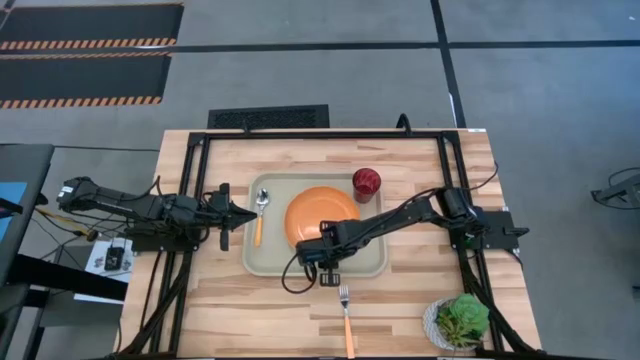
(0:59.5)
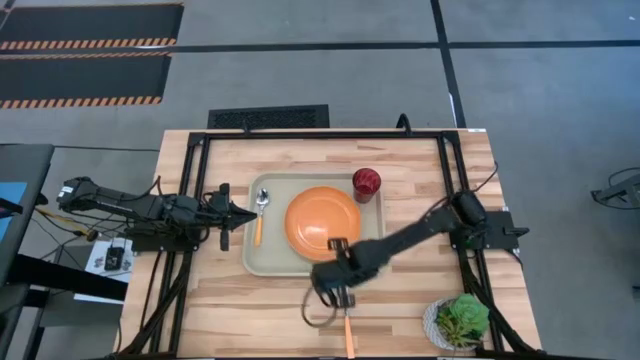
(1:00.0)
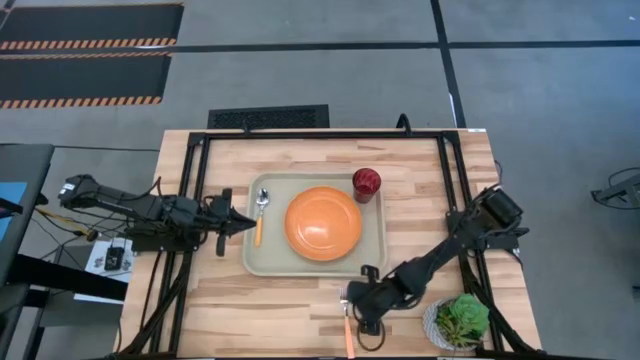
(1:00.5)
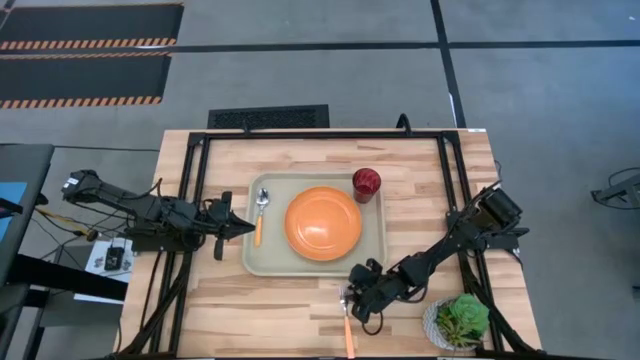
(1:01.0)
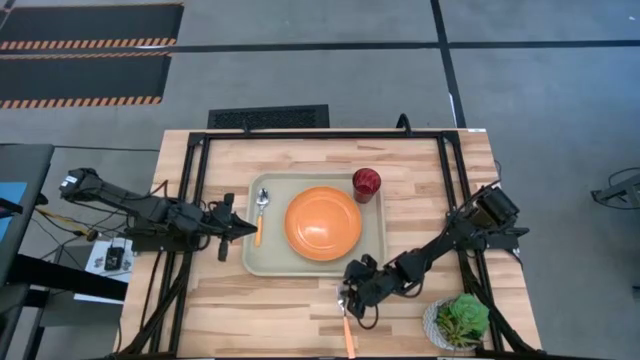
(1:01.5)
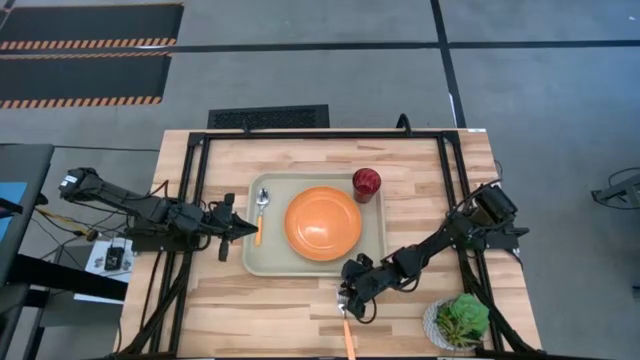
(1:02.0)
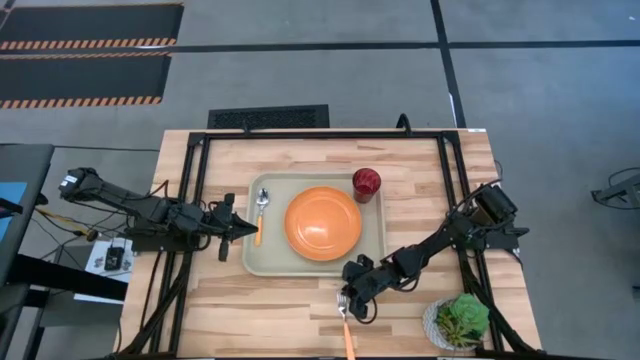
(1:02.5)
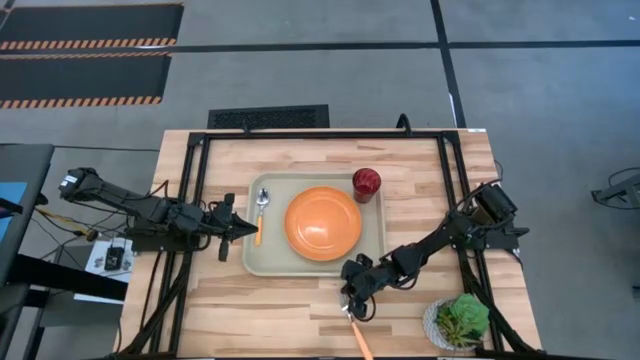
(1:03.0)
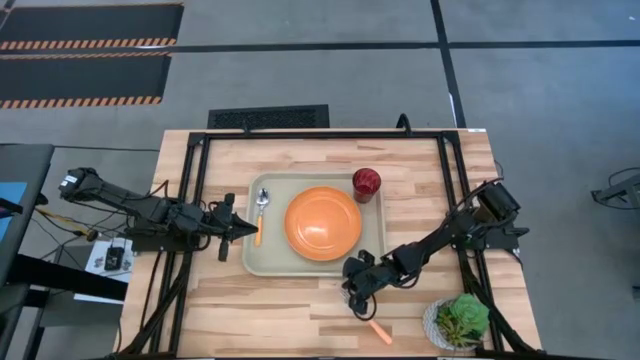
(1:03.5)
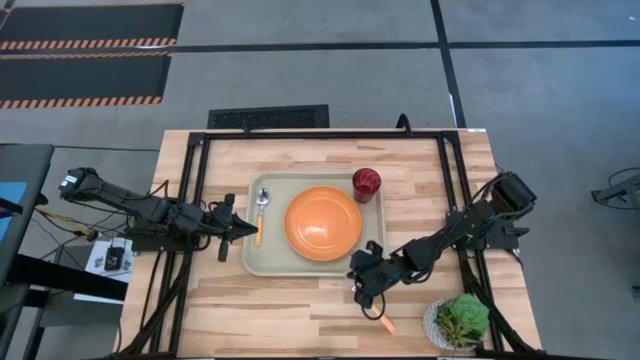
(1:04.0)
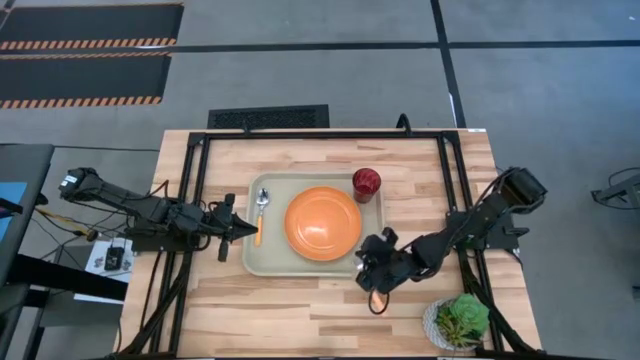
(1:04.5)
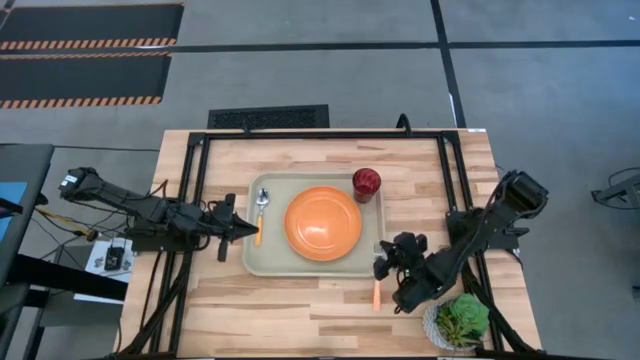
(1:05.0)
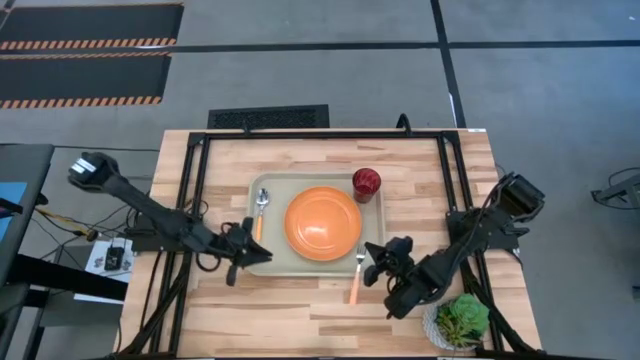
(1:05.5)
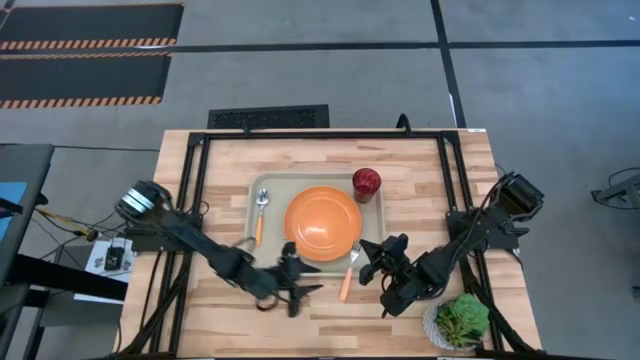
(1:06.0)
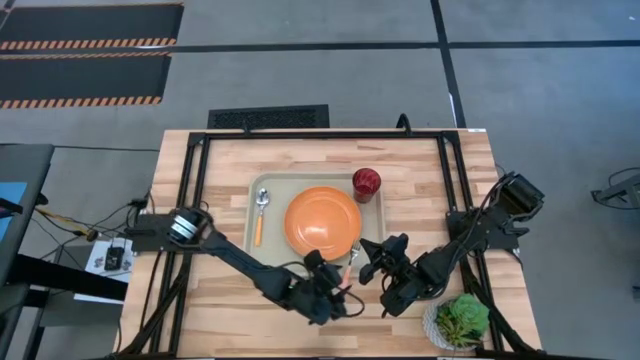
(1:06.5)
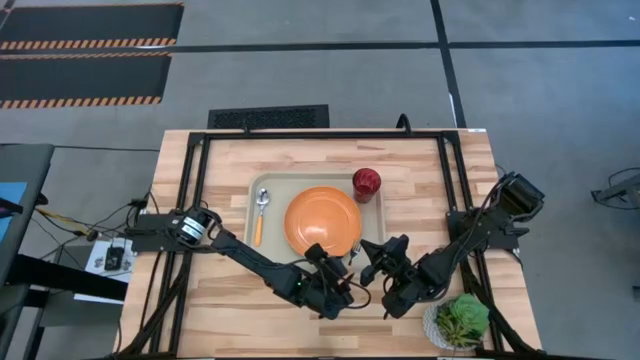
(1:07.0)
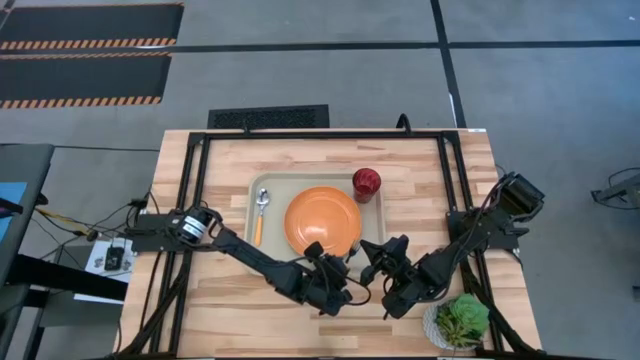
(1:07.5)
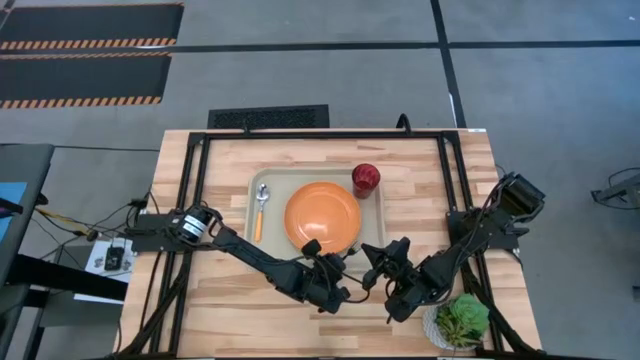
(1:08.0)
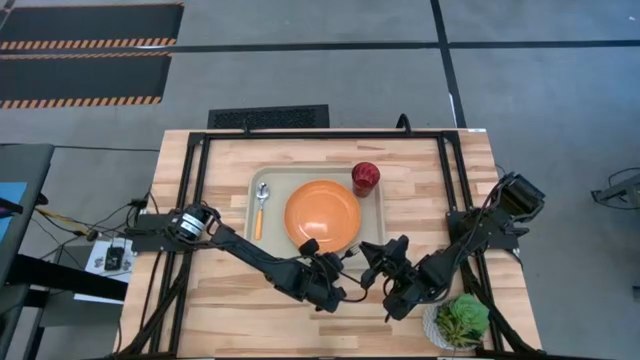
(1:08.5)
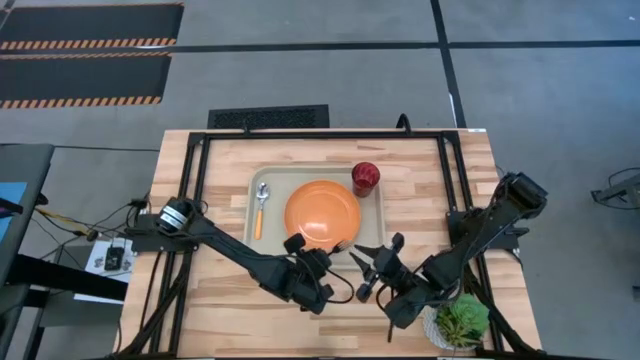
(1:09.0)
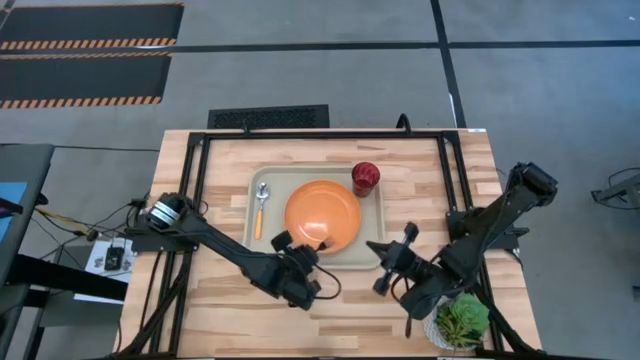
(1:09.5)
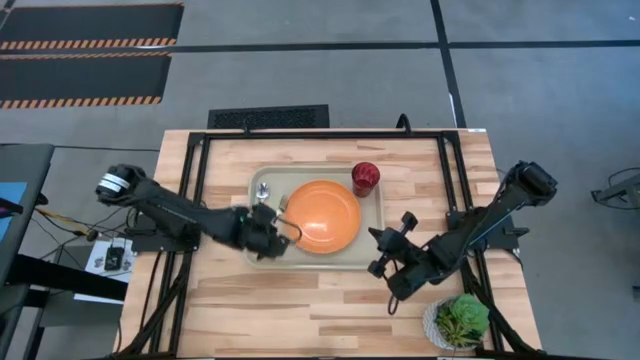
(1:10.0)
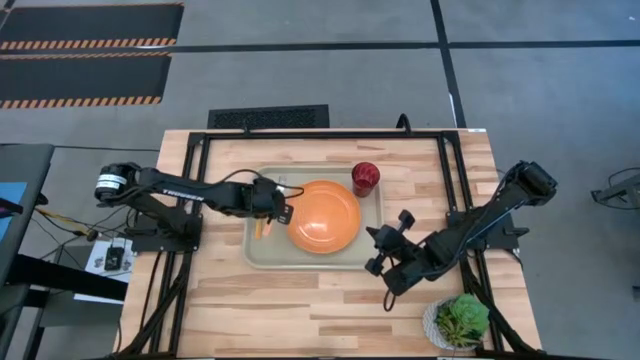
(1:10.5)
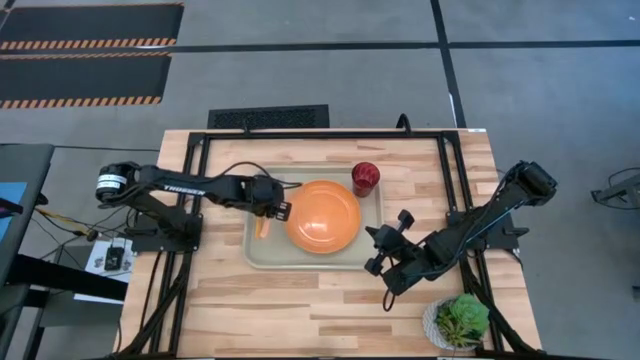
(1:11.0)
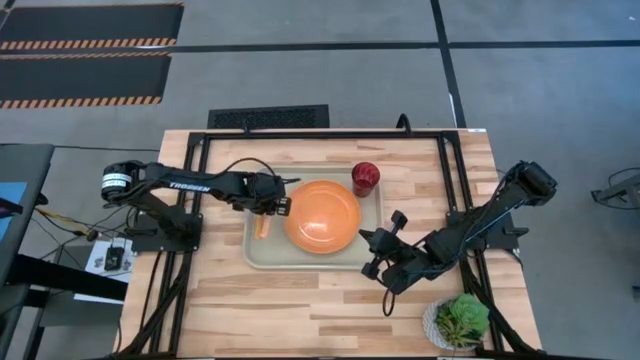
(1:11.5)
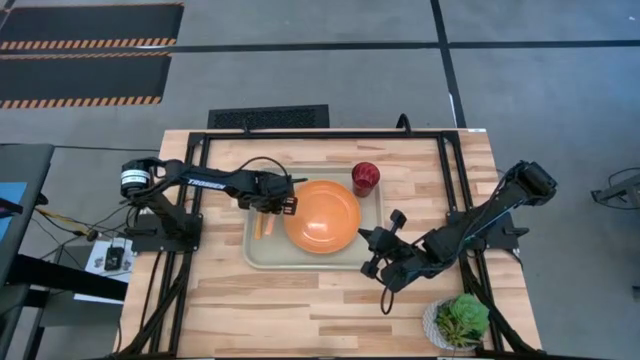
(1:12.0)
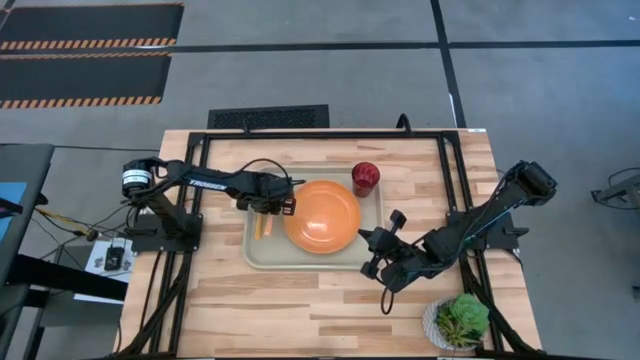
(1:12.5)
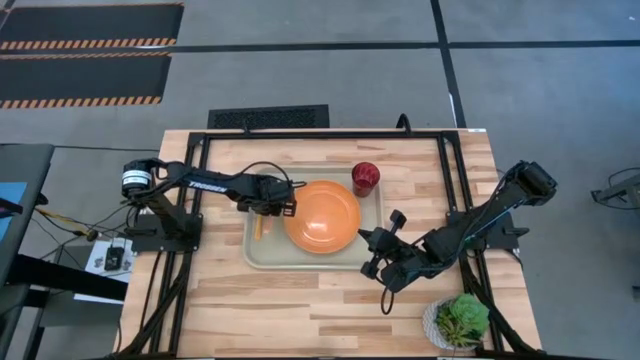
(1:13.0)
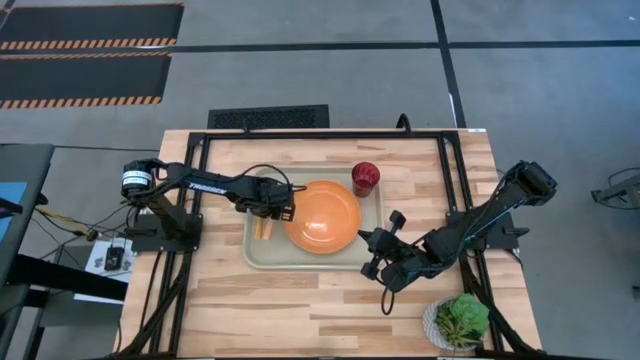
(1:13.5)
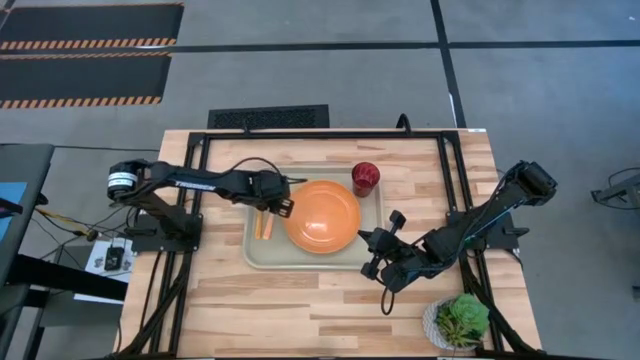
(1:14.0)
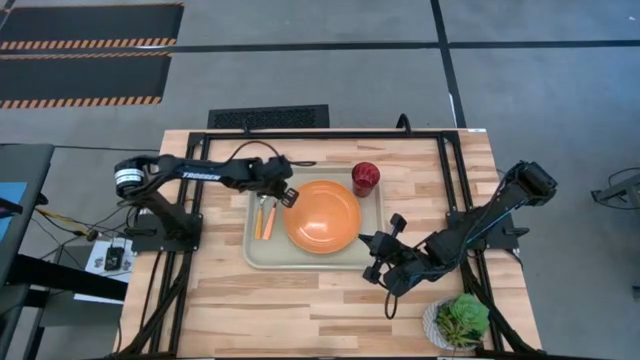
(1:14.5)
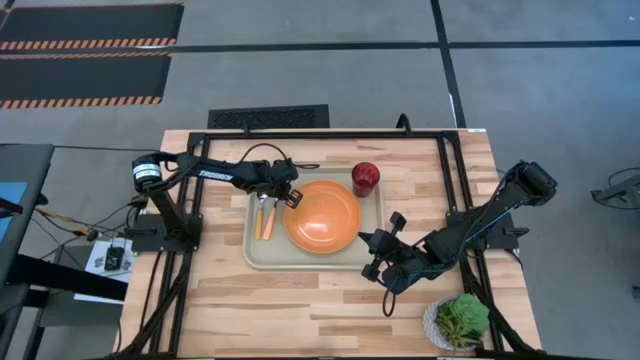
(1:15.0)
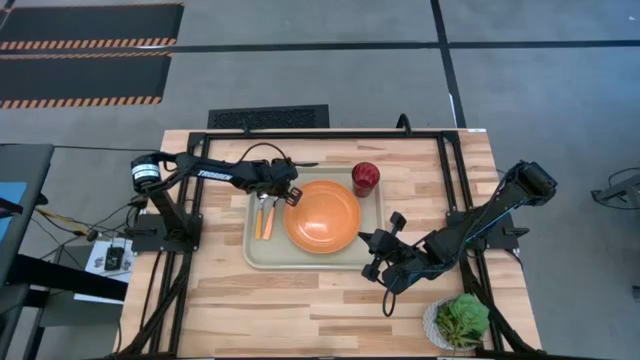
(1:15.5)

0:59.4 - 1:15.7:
Task: Pick and place plate/cup/fork/spoon on tray
Put the orange fork on the gray serving tray to the left of the orange plate

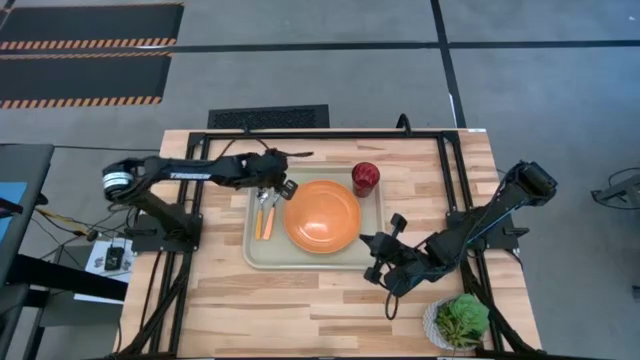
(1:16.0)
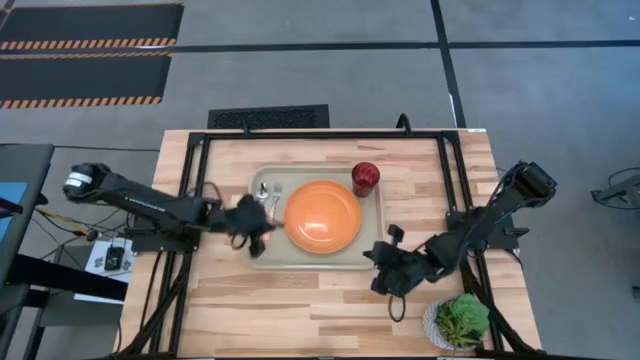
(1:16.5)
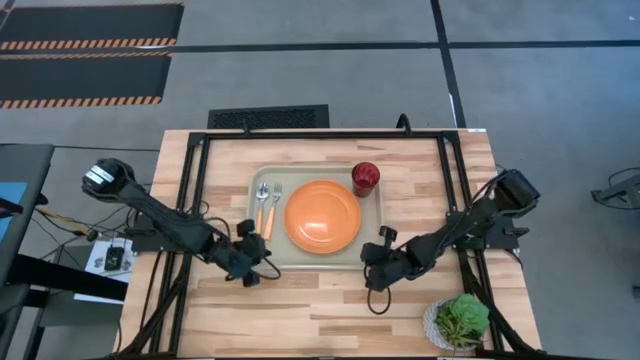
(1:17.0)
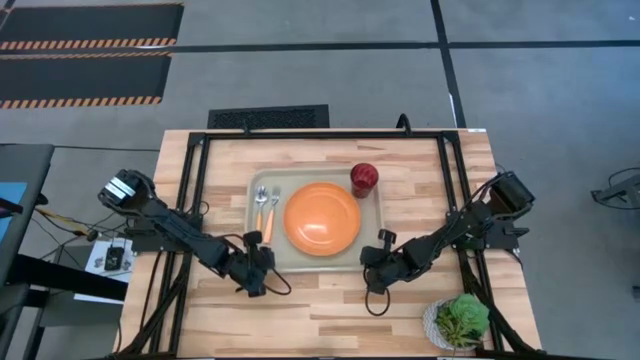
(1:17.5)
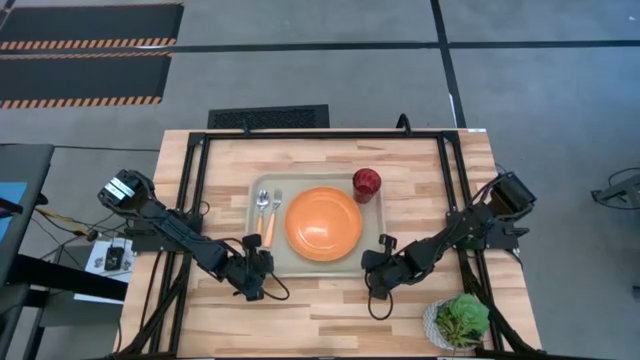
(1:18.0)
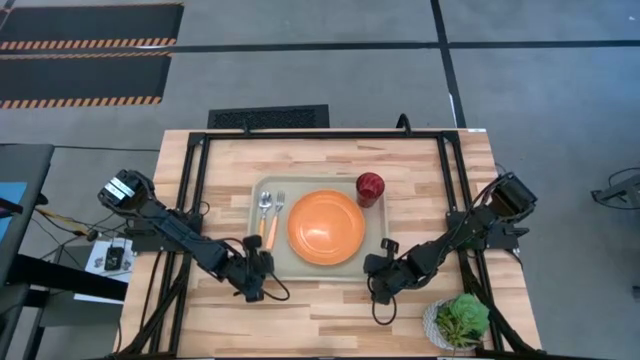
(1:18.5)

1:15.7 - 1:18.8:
Adjust the gray serving tray

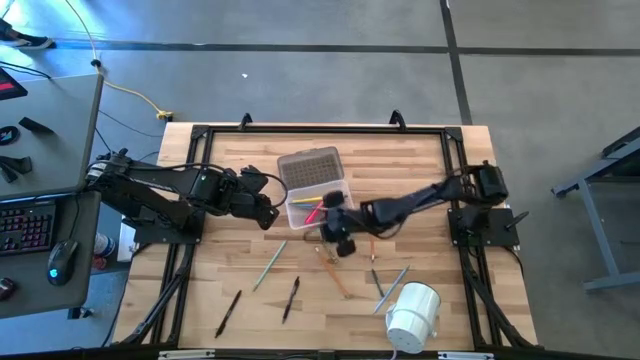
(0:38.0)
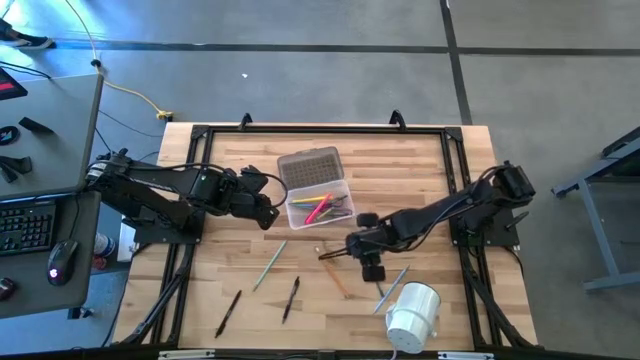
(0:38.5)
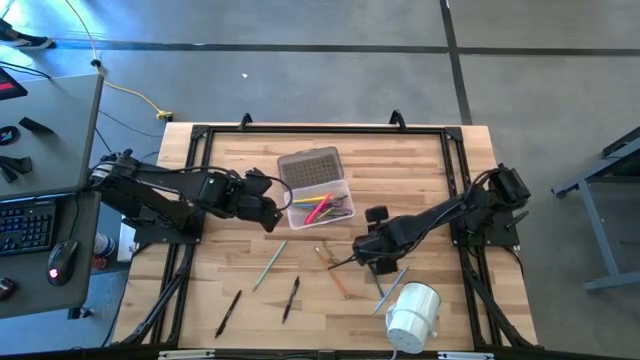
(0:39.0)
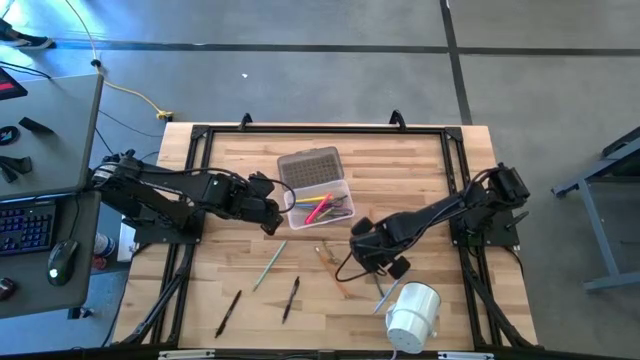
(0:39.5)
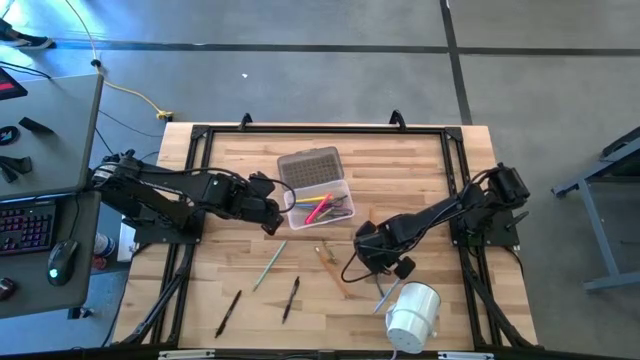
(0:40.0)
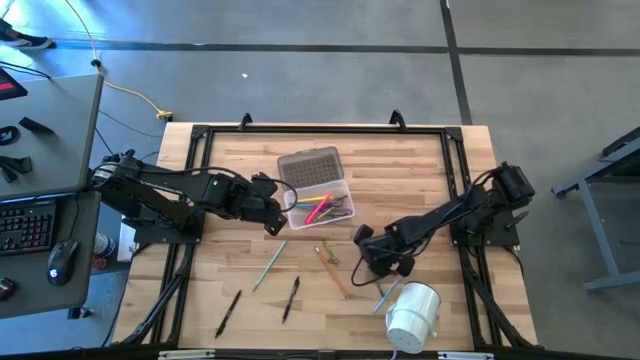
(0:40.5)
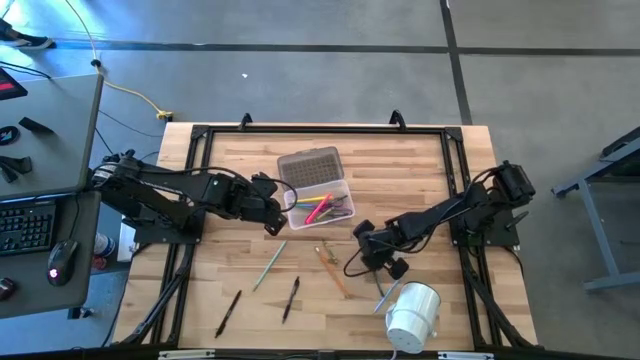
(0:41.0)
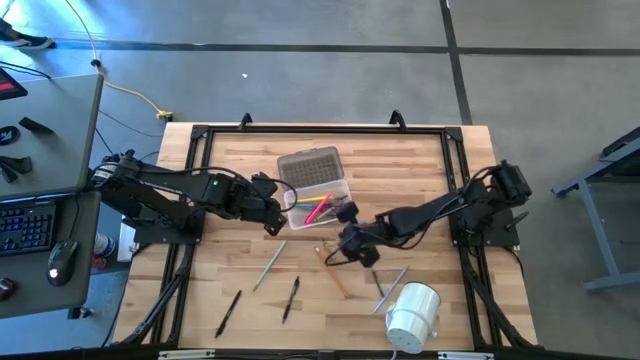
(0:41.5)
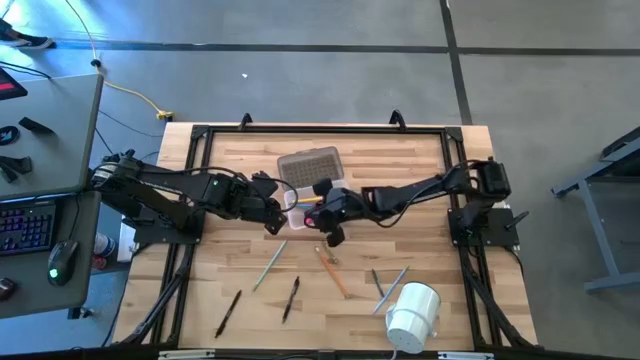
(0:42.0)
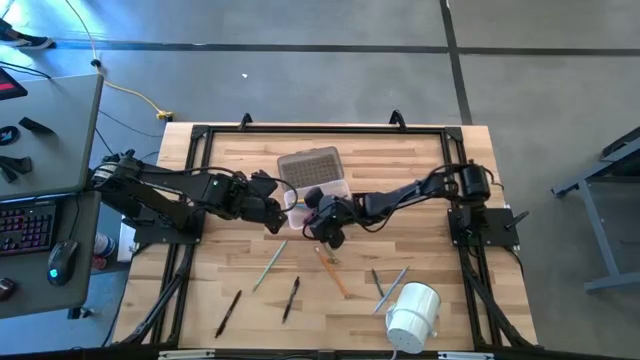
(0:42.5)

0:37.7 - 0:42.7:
Task: Pick & place school supplies into a supply box
Put the right orange pencil into the supply box
